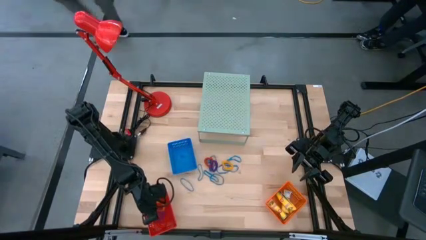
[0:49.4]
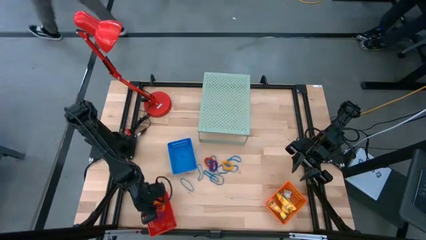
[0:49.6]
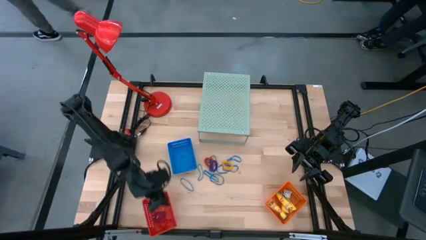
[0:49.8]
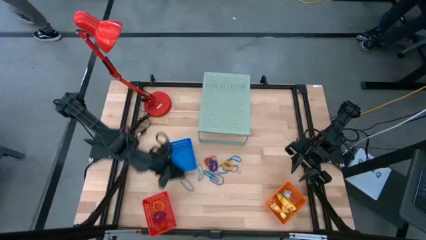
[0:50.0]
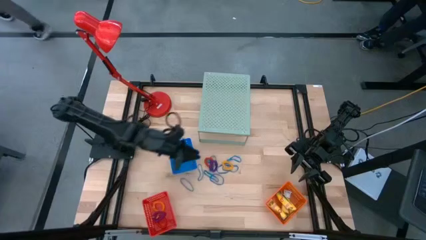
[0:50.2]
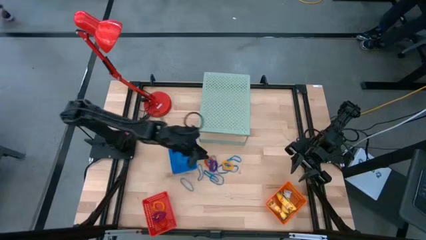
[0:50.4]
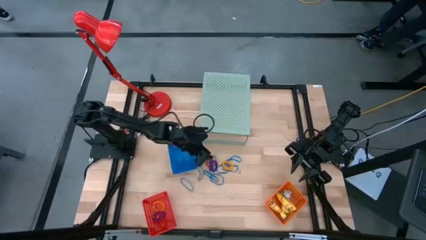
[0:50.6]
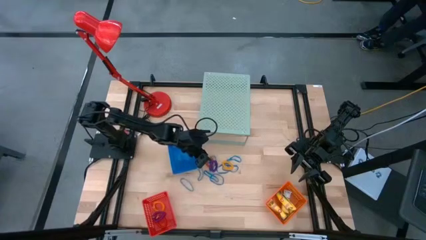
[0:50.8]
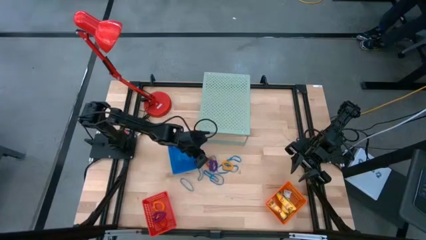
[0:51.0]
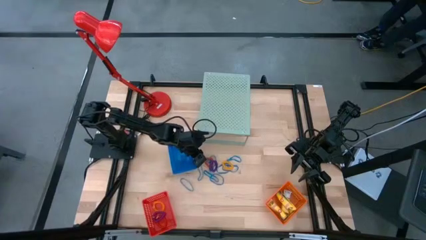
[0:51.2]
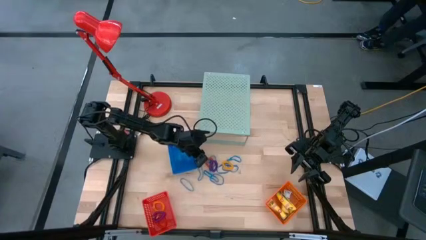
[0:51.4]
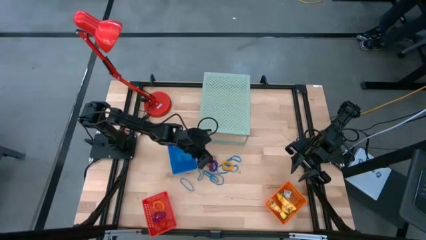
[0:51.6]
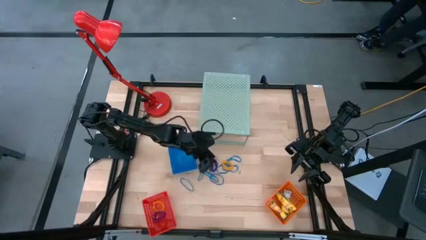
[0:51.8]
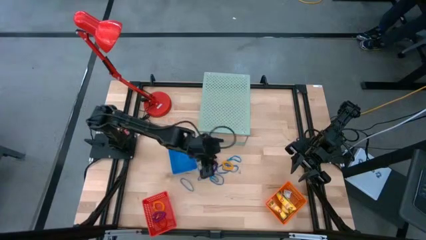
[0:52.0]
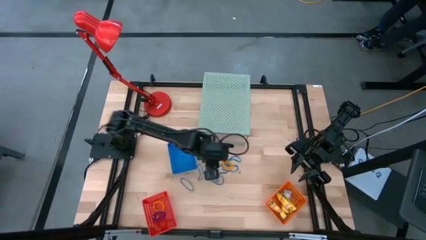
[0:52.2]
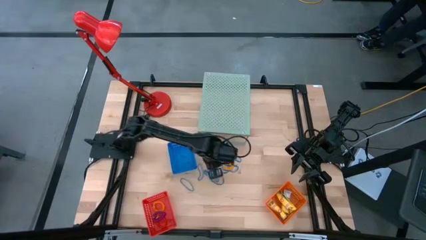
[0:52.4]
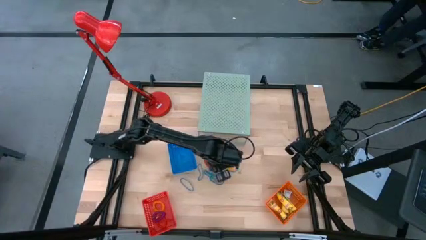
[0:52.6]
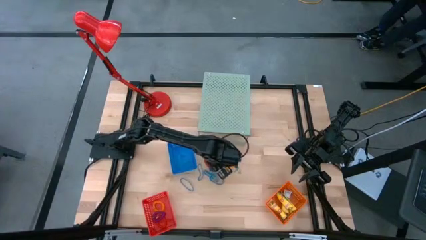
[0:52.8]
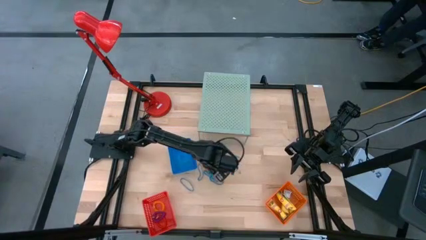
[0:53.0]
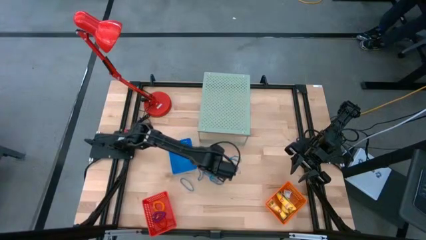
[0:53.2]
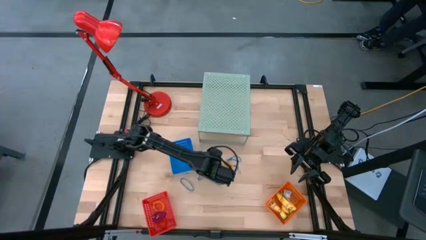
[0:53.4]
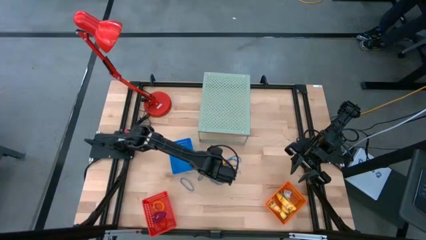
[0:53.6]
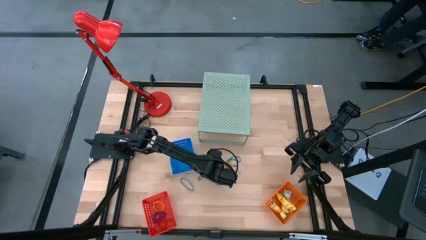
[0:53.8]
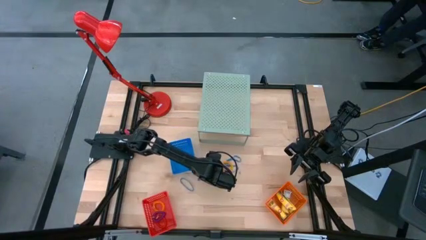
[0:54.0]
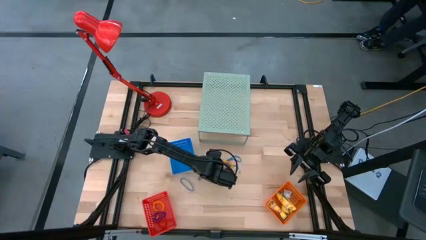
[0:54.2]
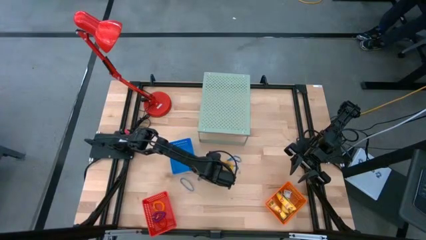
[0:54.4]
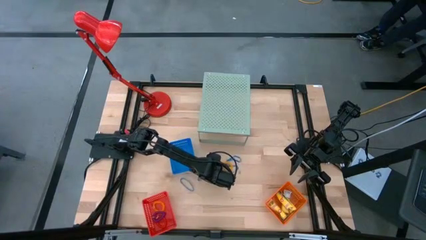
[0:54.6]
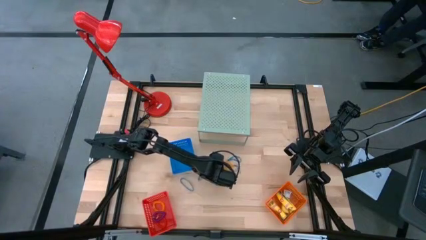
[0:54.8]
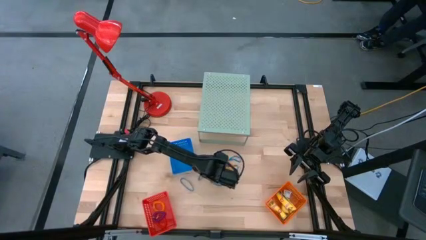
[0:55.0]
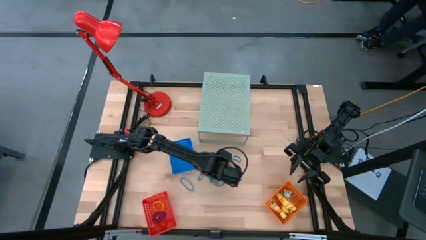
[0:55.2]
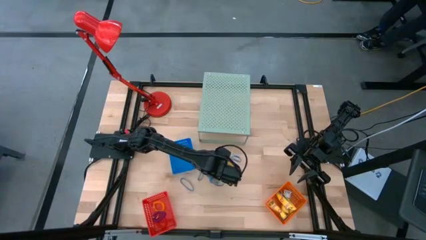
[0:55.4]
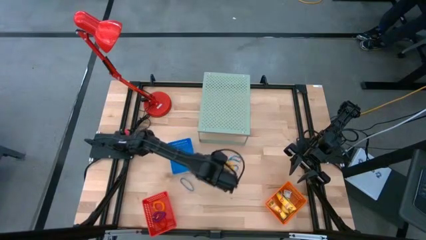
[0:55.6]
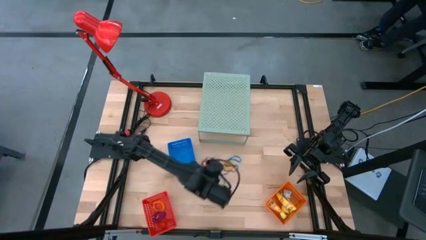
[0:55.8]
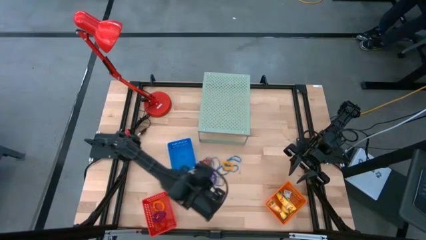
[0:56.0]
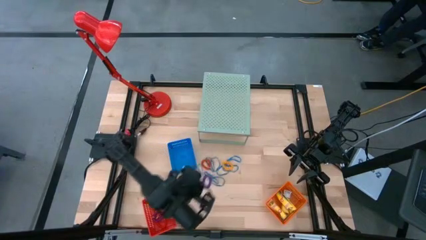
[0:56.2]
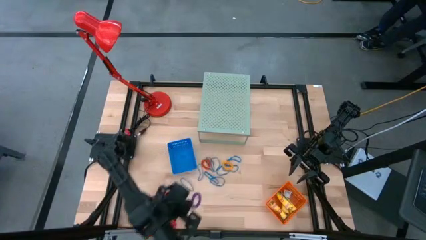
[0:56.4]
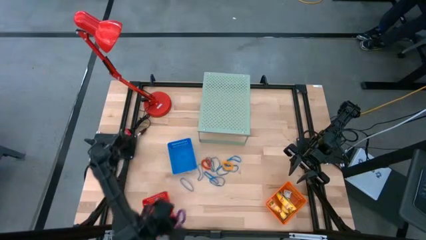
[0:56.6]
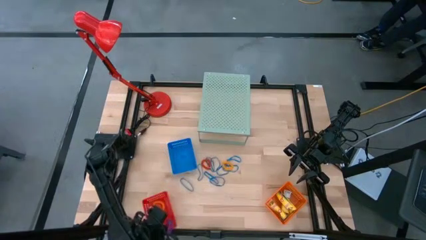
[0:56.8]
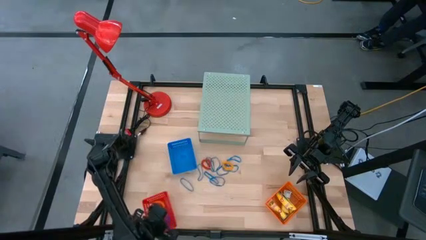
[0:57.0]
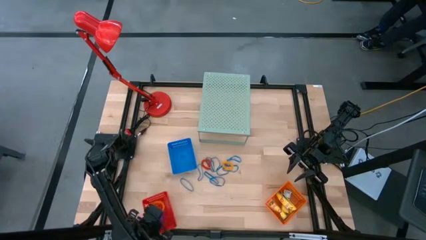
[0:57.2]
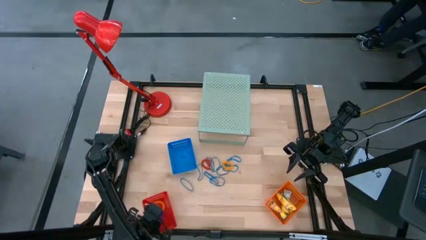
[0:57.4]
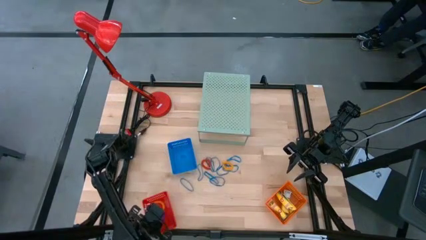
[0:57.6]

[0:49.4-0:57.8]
Task: Pick & Place Office Desk Supplies
Put the purple spring keychain into the red basket

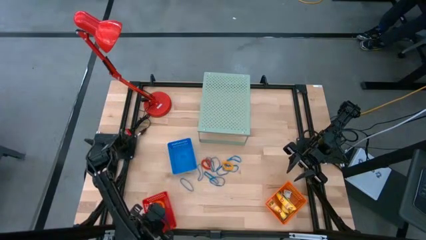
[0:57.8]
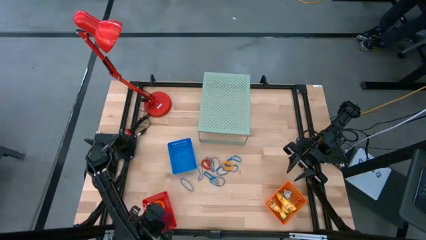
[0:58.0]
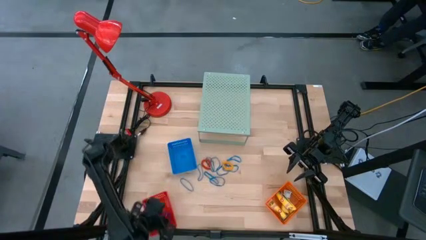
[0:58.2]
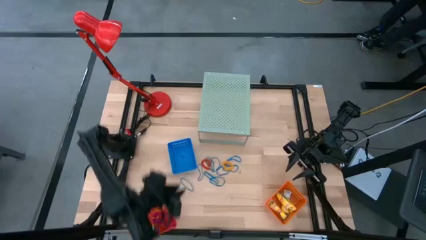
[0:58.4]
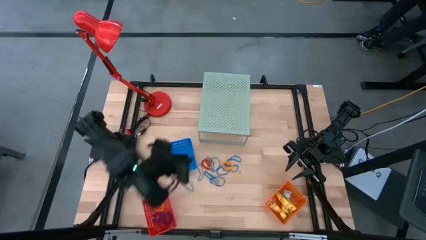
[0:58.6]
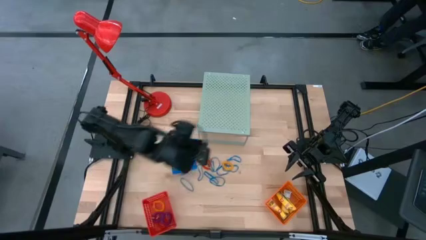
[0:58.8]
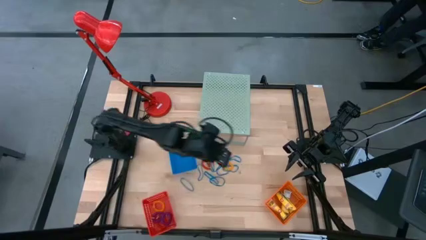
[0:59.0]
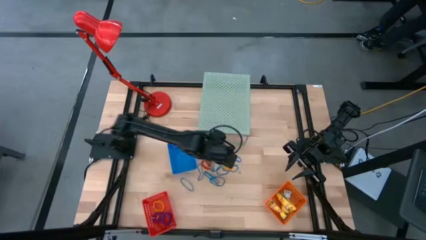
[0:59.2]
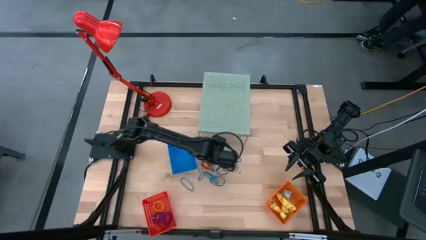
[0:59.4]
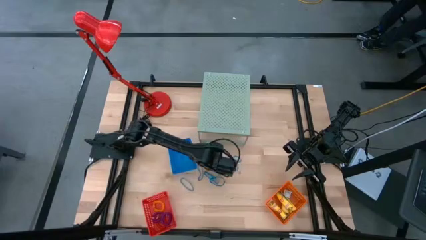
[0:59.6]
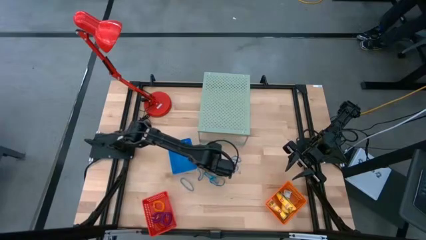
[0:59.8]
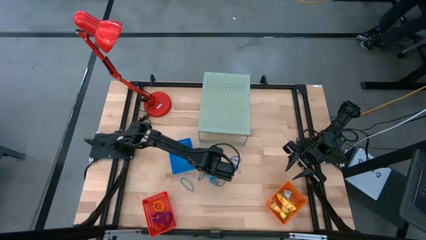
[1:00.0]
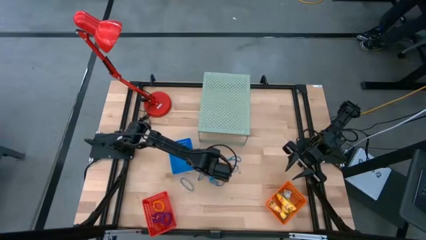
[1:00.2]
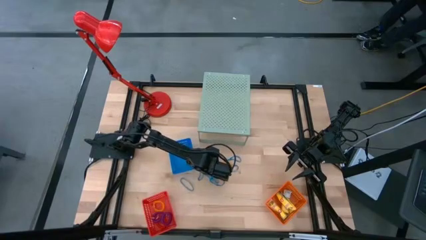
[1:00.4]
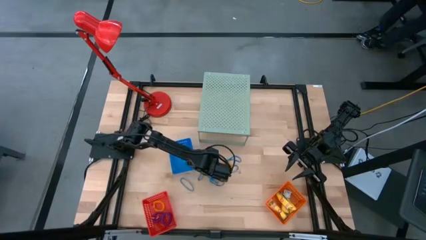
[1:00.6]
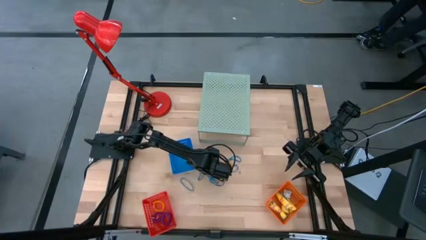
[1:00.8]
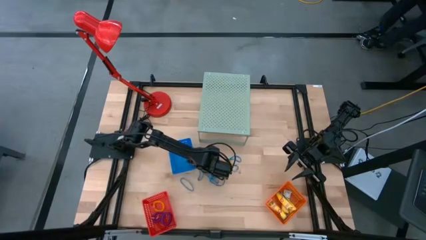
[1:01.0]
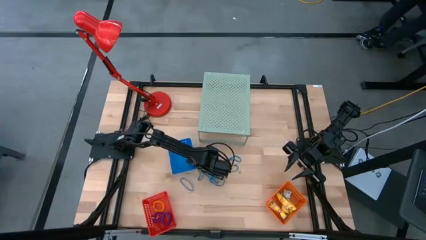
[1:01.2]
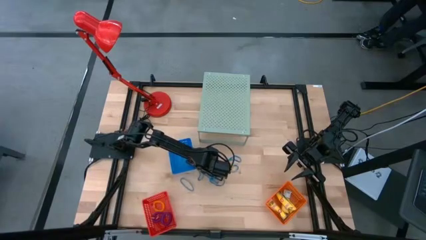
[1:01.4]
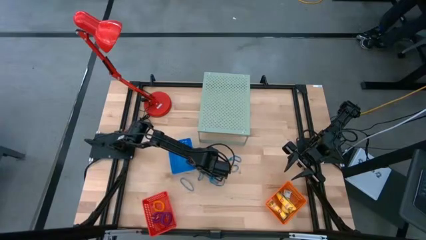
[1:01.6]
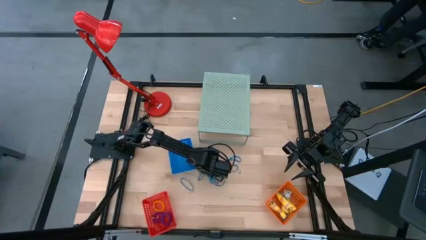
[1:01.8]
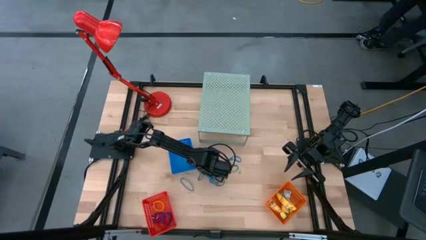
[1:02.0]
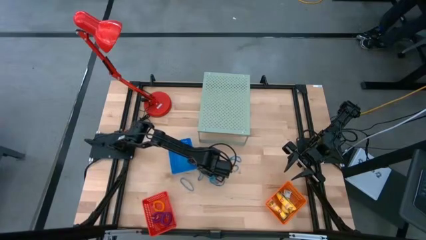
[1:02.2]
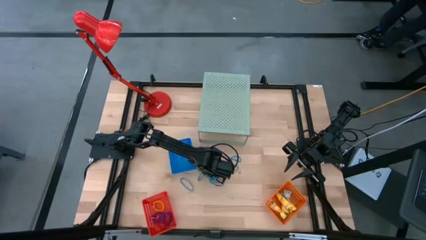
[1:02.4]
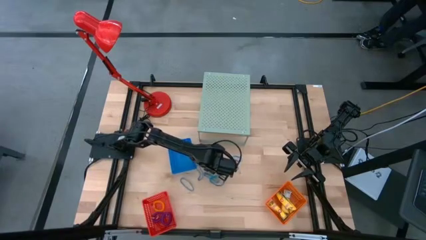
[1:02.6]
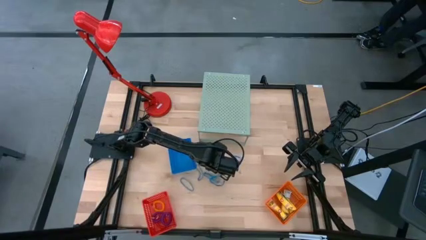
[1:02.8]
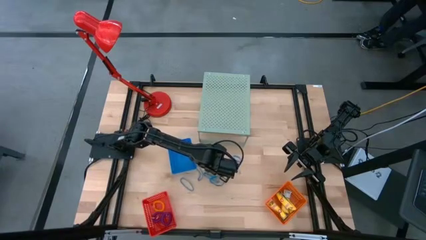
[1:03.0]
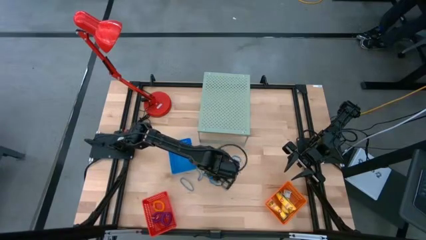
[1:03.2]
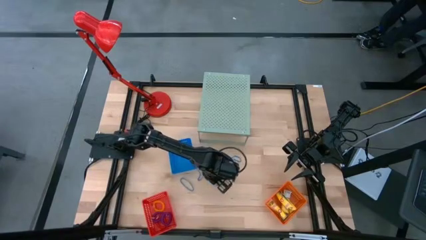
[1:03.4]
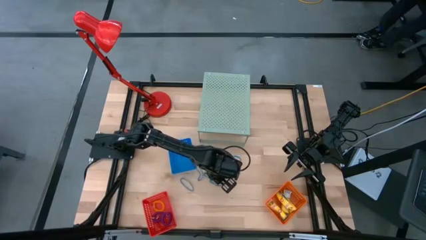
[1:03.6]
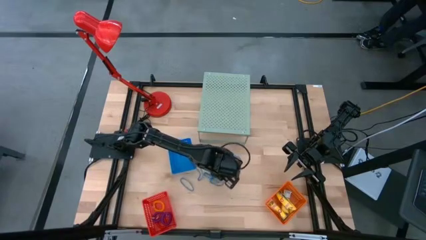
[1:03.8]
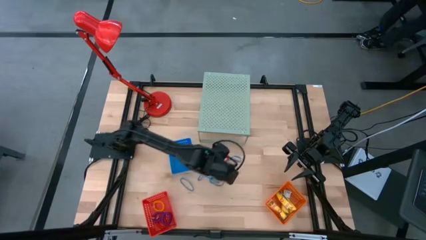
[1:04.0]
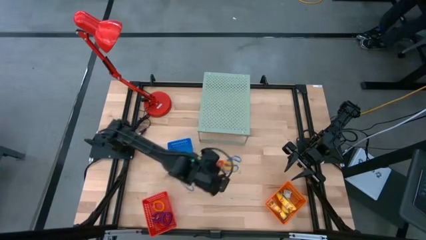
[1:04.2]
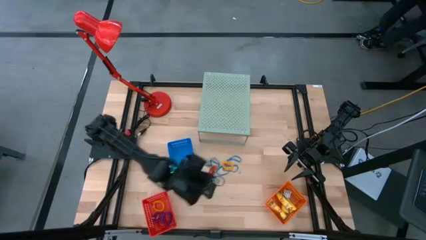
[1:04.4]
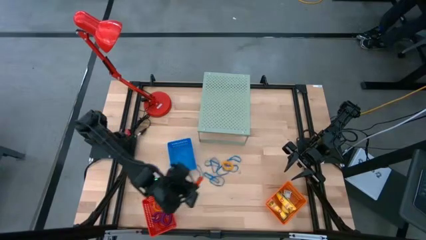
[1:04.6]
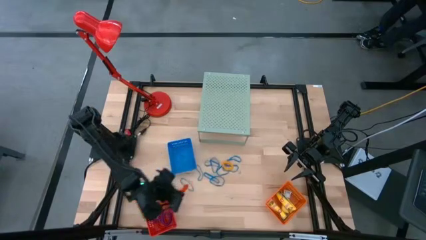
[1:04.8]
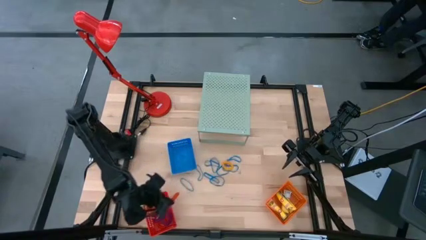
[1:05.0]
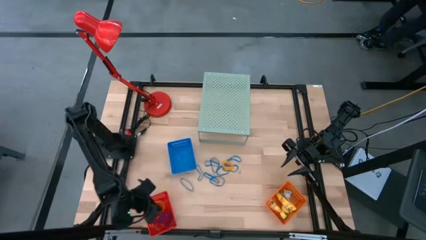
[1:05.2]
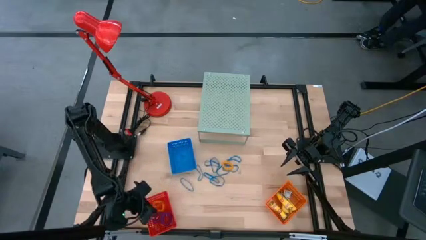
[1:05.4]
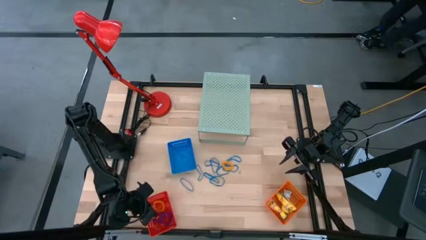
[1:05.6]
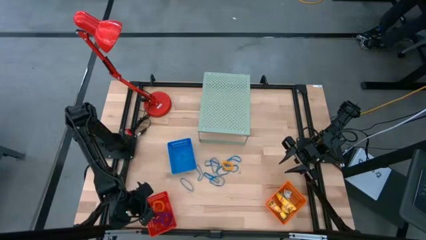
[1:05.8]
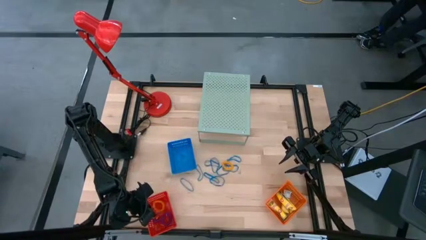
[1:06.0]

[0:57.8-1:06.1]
Put the orange spring keychain into the red basket
